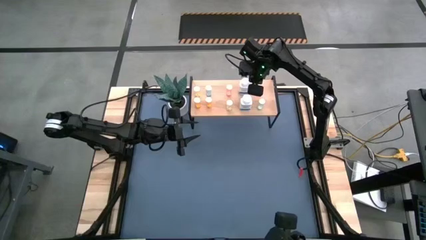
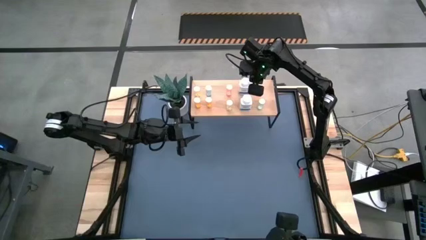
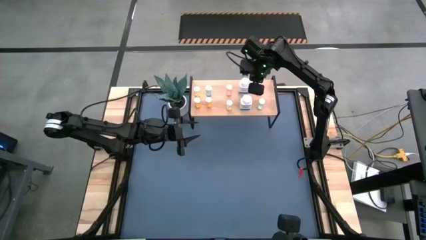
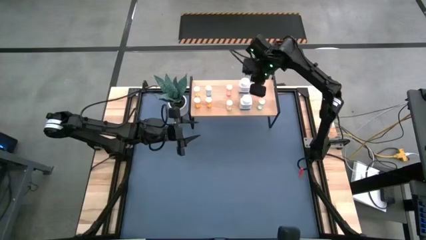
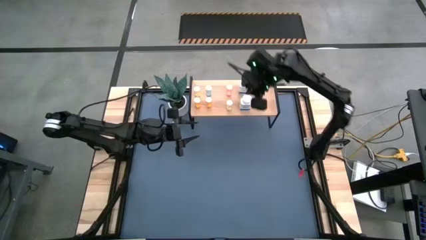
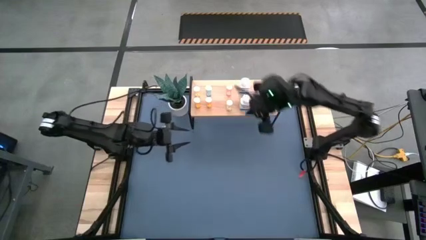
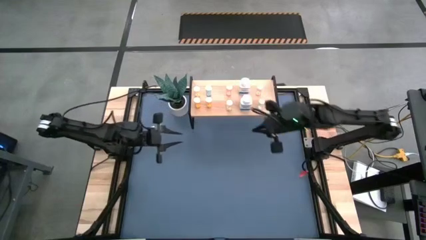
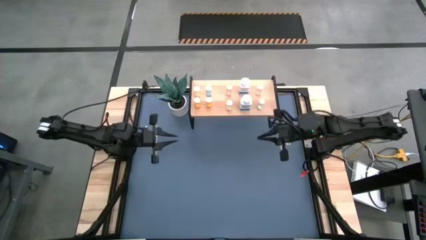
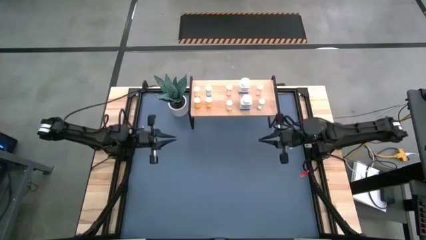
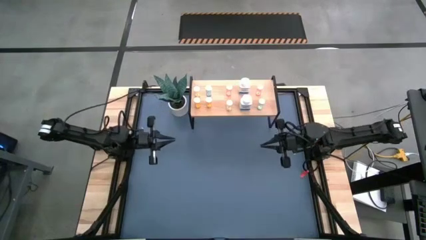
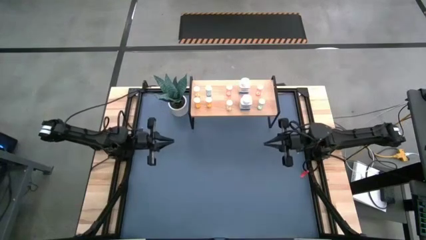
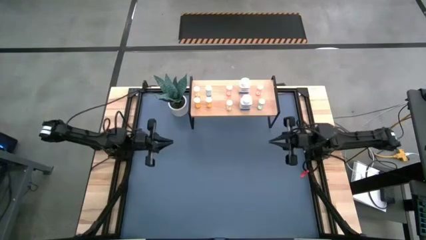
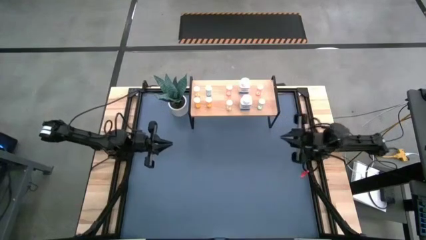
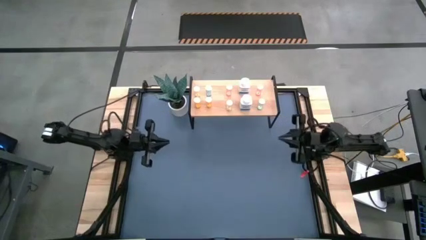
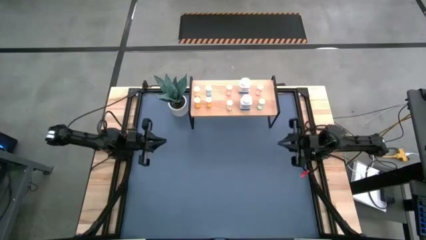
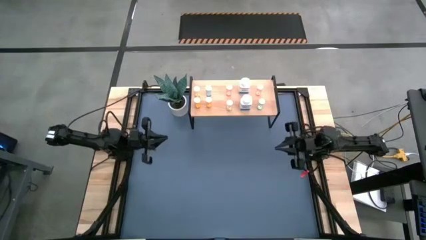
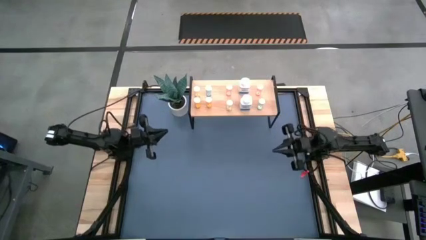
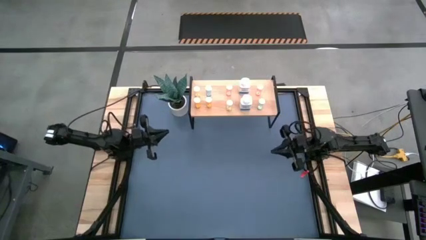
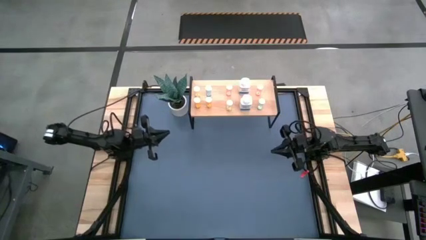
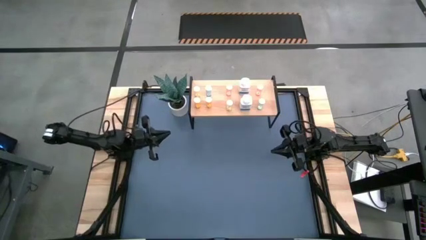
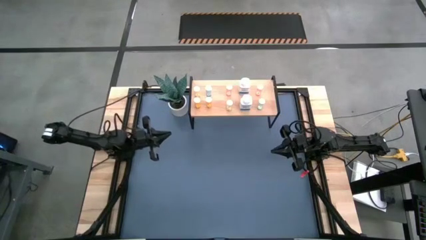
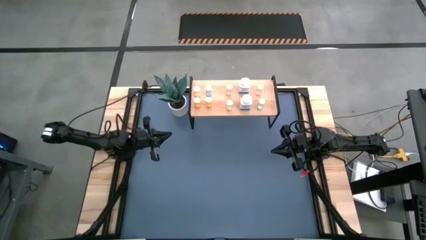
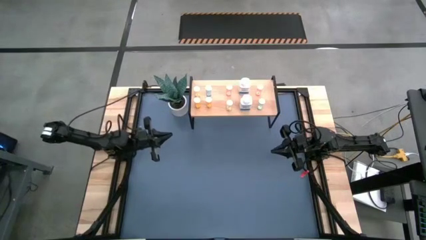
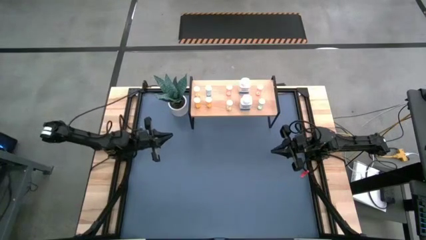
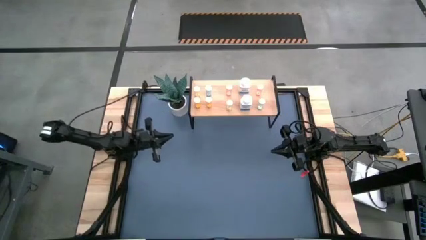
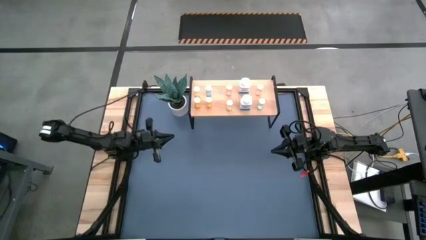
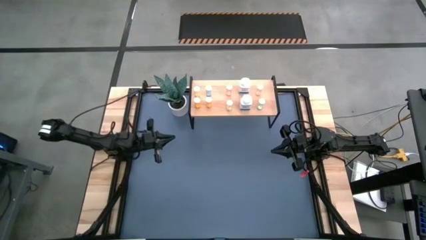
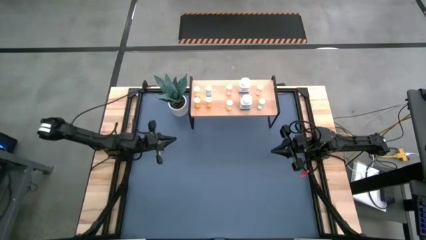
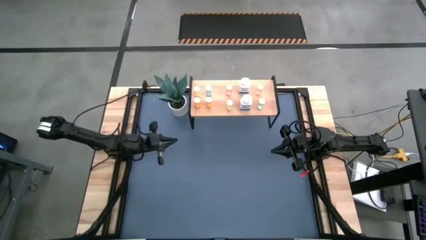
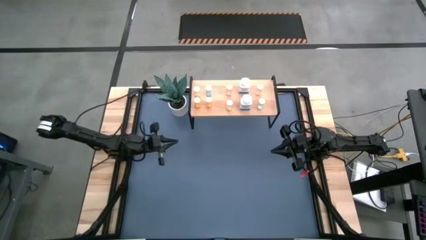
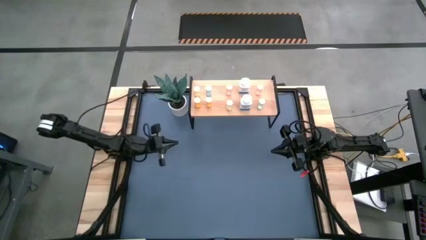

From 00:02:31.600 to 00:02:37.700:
Task: Pick and place medicine bottles onto shelf by color
Return to Home Position

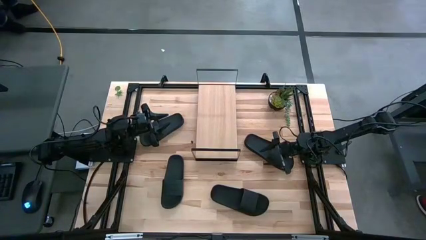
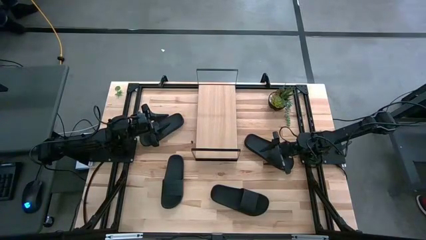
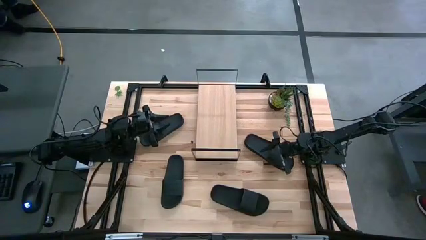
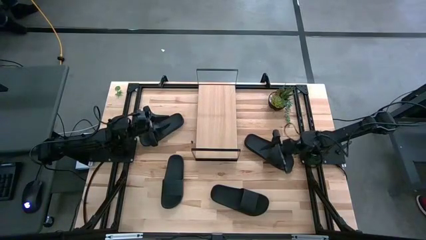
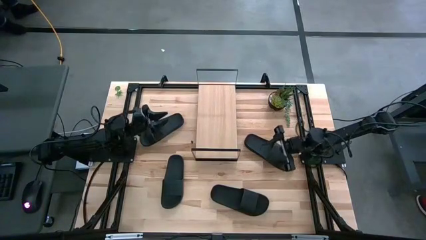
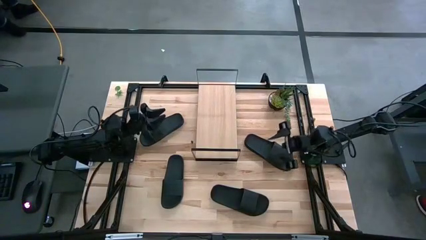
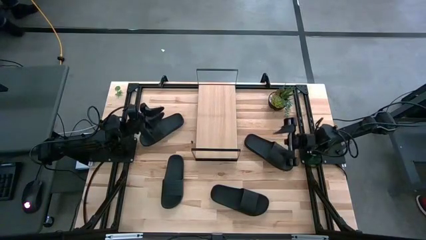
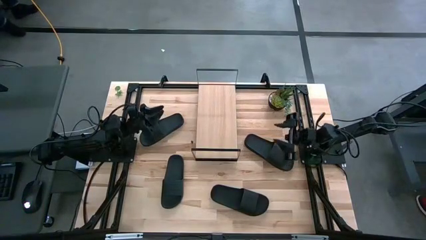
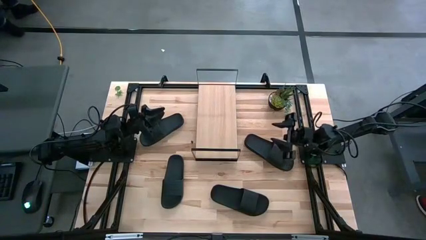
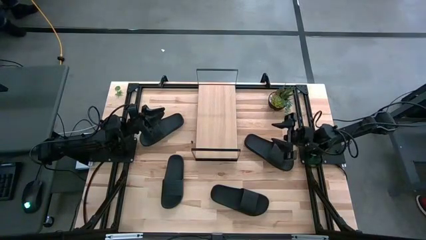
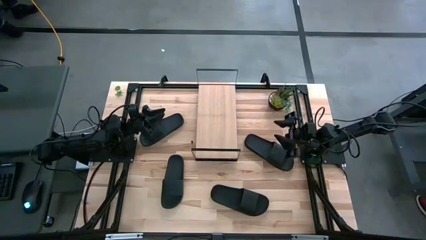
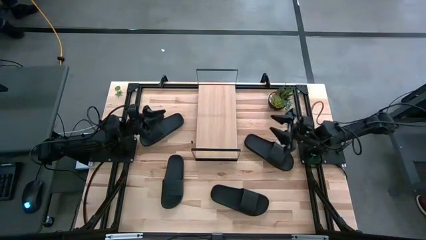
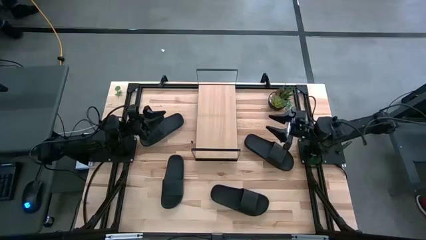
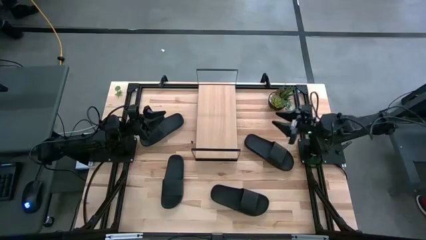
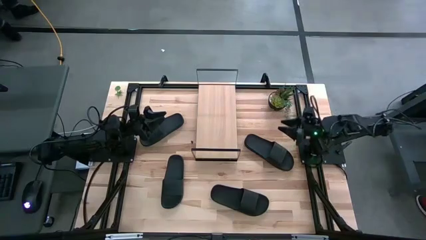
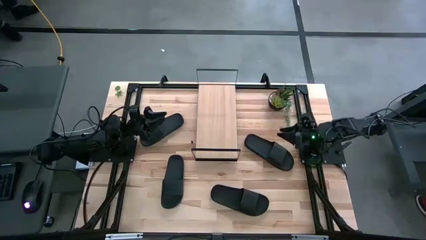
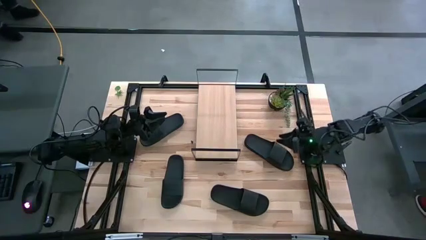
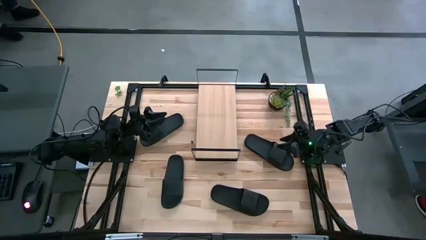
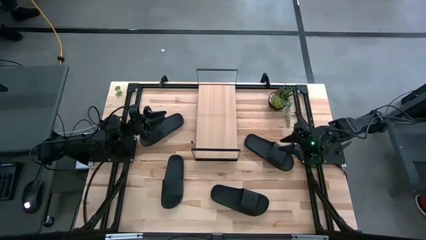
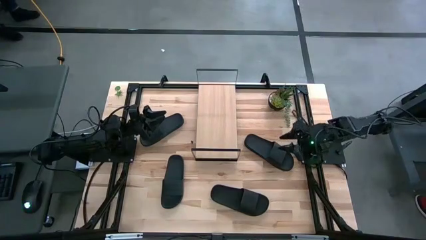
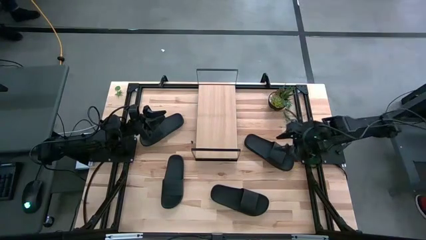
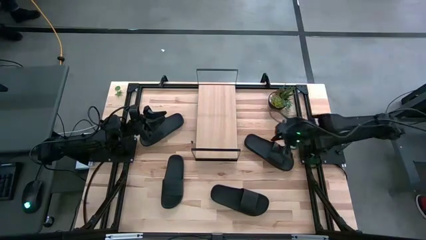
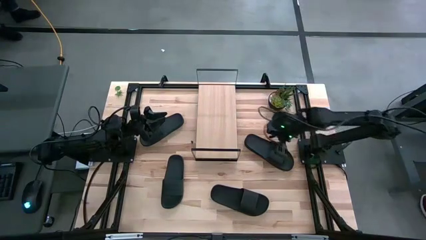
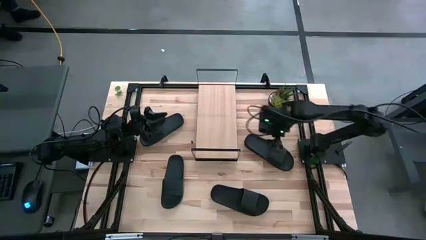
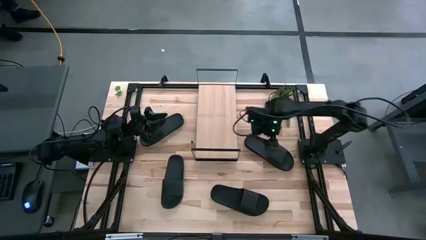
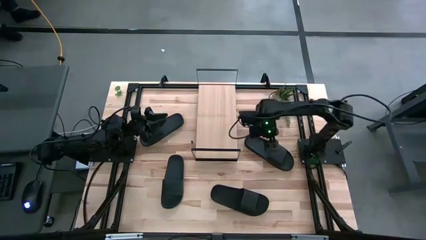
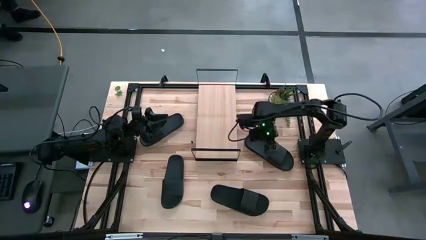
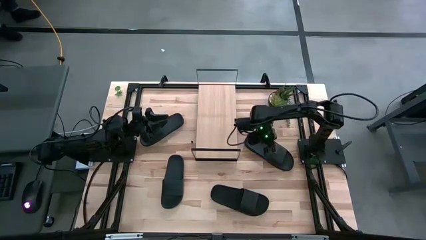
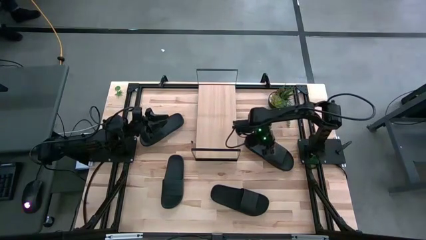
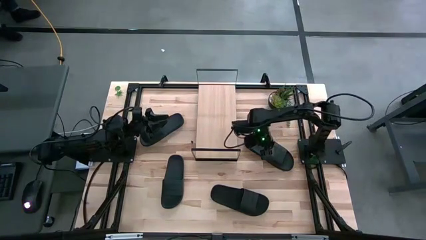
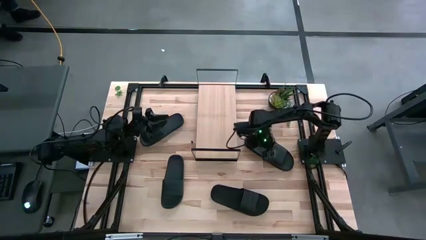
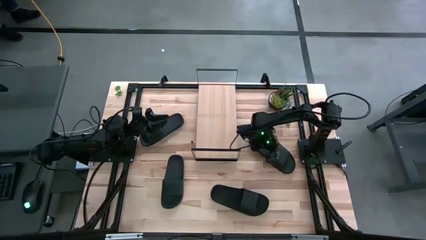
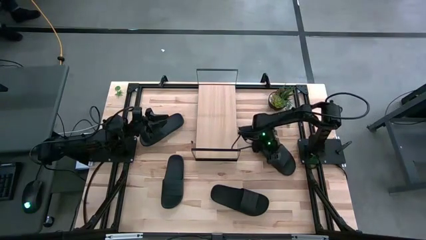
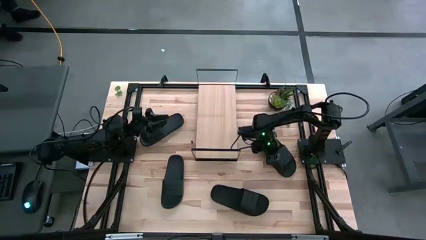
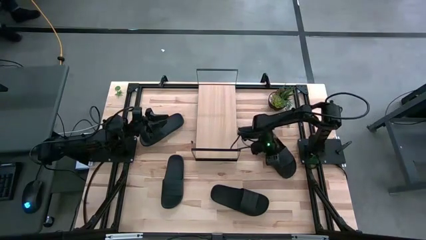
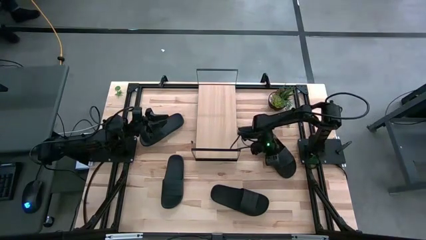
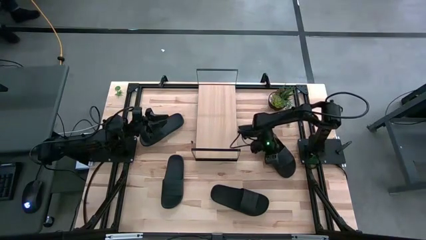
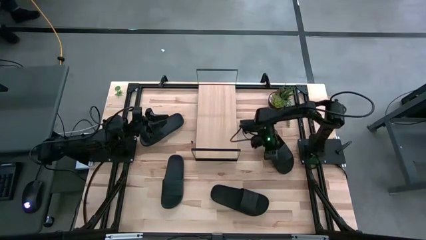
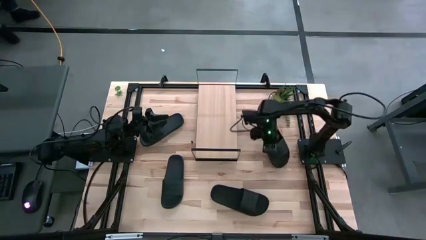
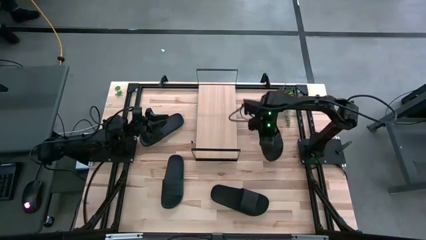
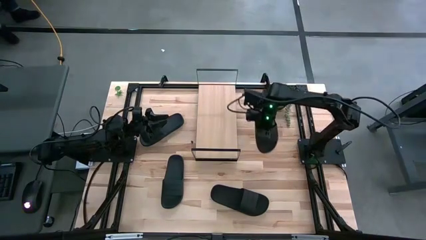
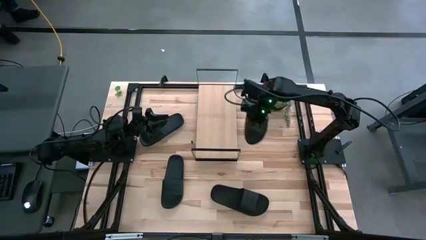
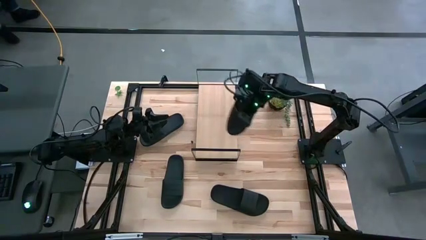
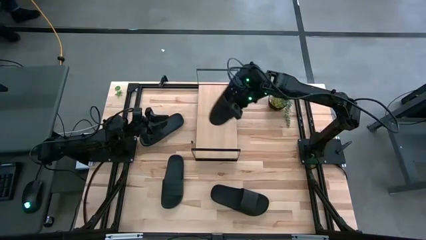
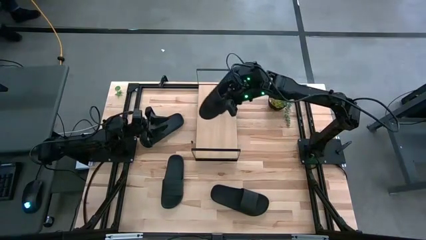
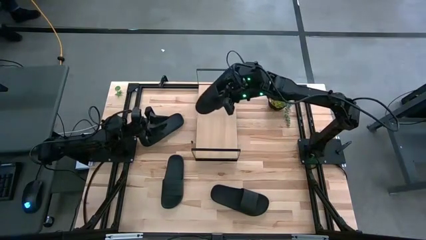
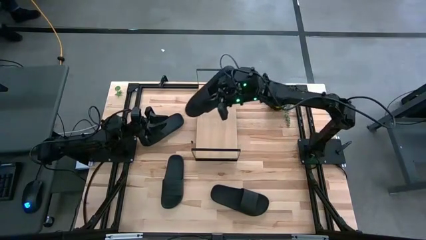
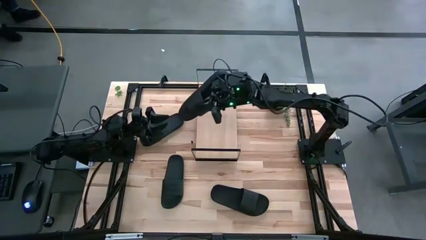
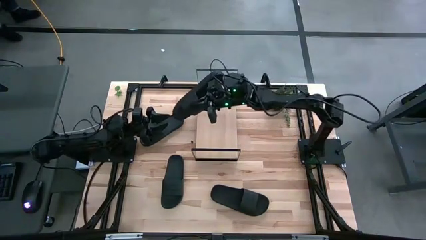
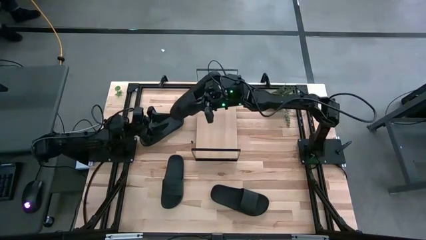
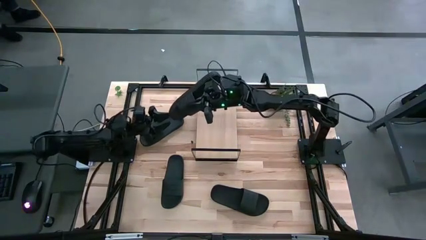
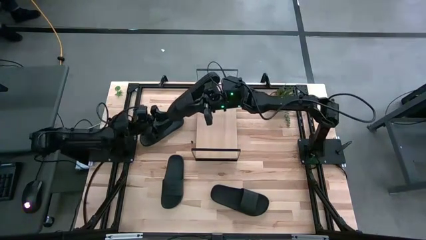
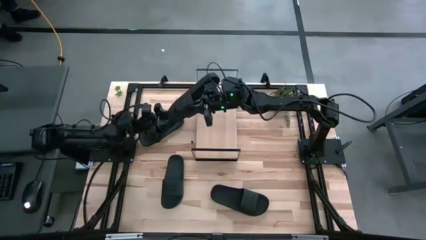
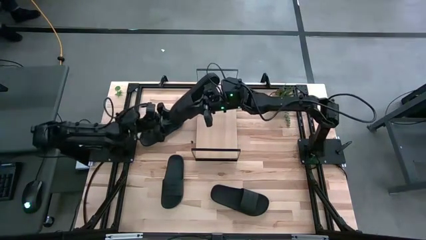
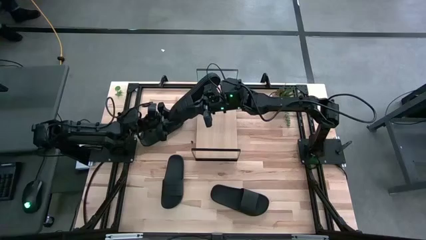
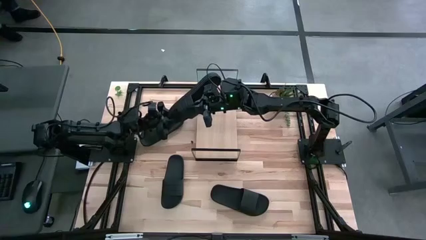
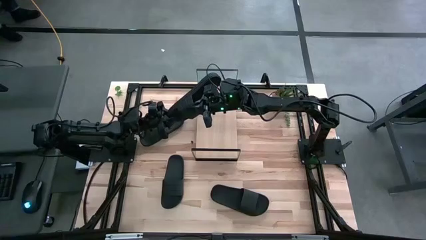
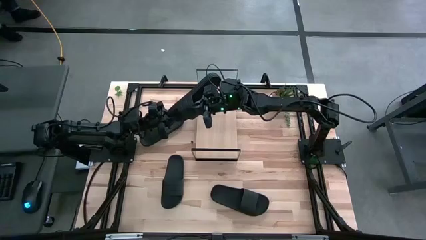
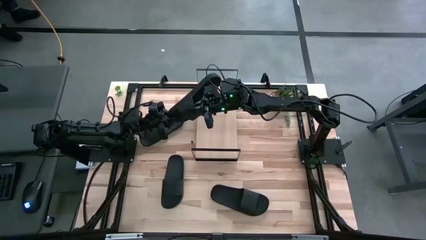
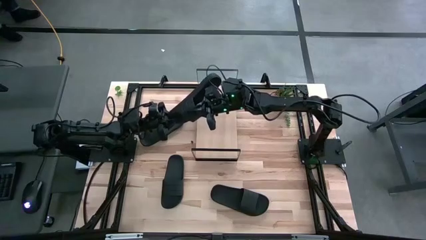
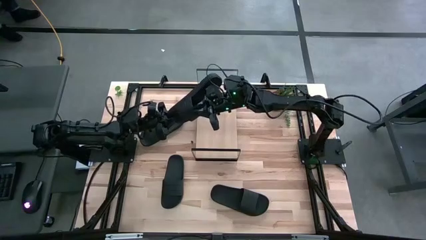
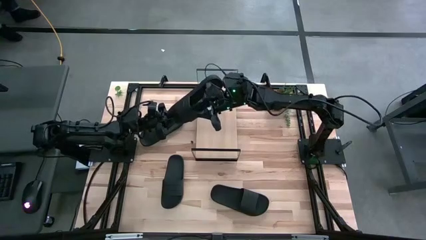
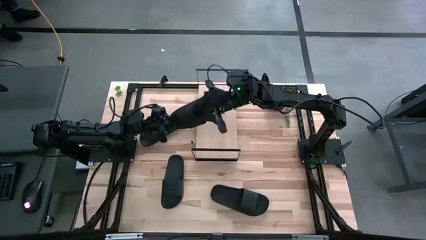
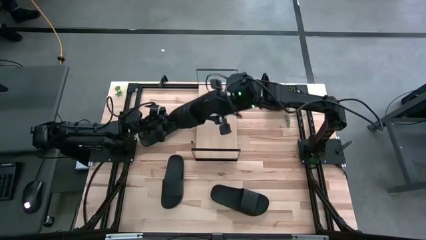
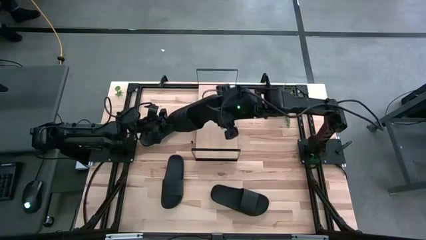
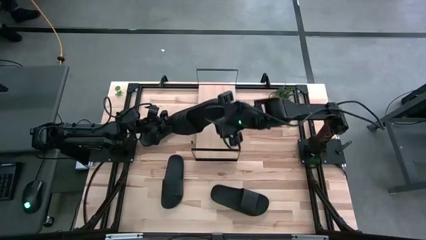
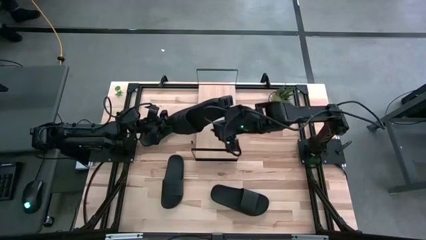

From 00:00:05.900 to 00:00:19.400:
Task: Pick and place slides into the shelf
Put the top right black slipper on the shelf
